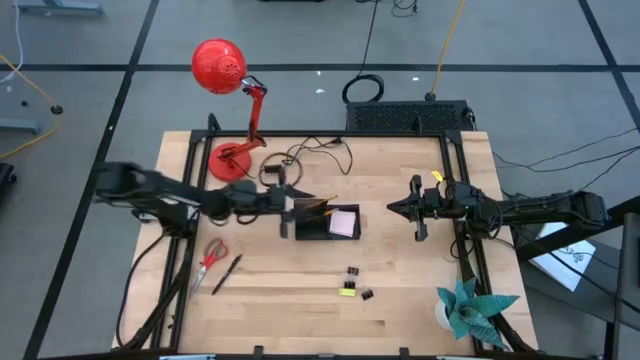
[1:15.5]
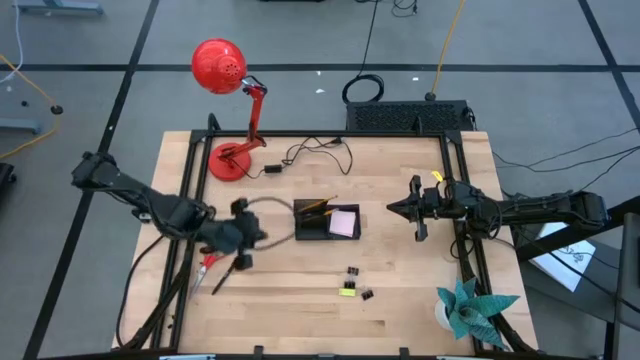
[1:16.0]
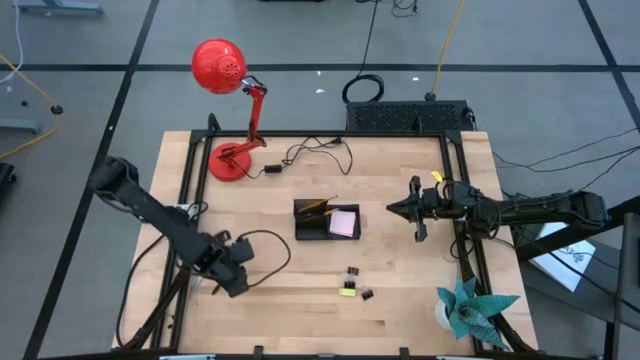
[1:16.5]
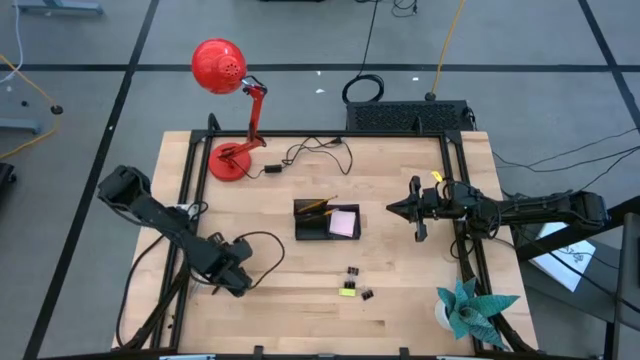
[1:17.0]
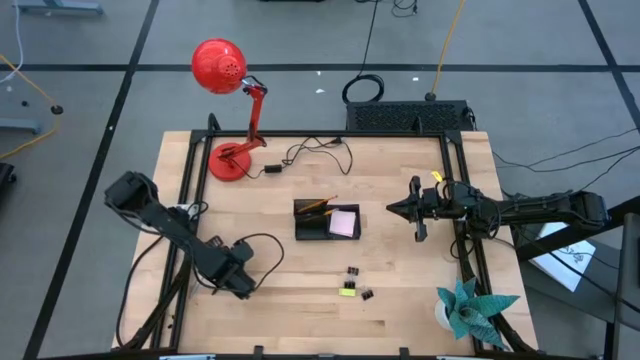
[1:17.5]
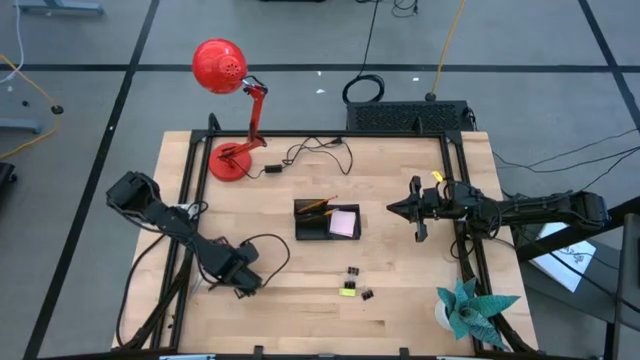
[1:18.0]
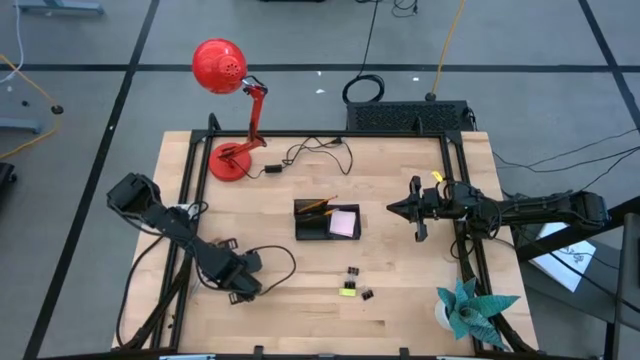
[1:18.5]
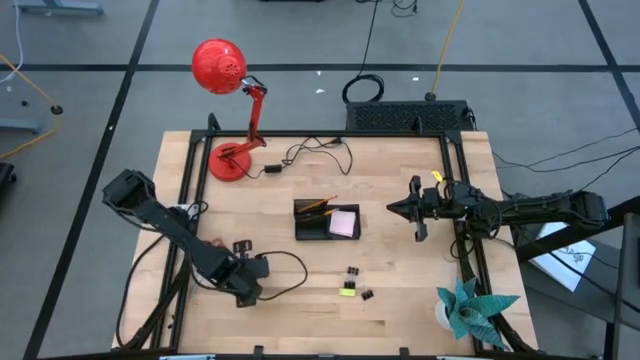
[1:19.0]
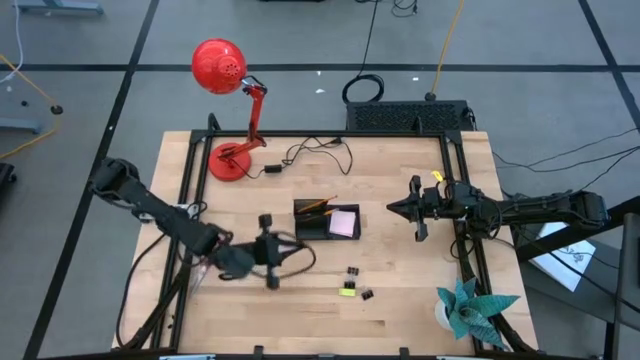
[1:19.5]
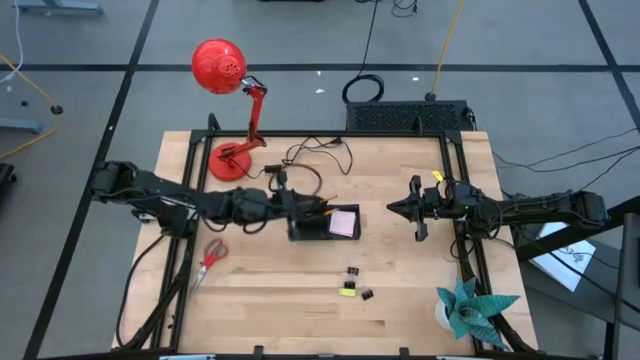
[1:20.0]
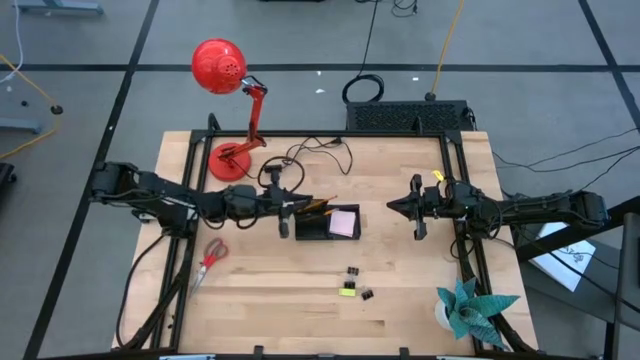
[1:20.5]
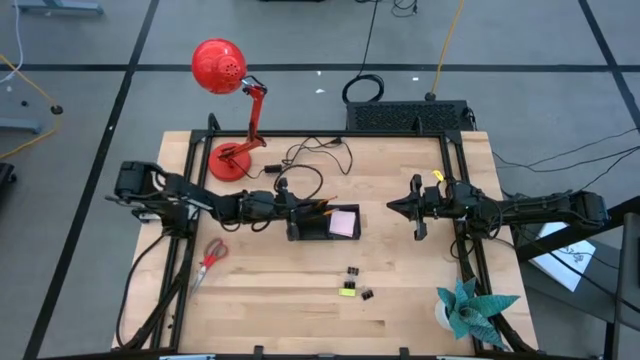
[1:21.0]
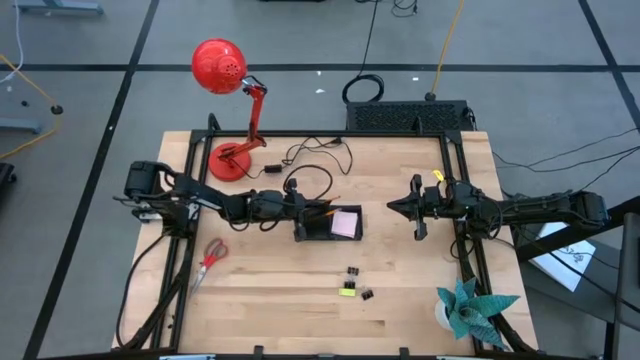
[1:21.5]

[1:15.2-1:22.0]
Task: Pick and place office supplies into organizer
Put the pen into the desk organizer

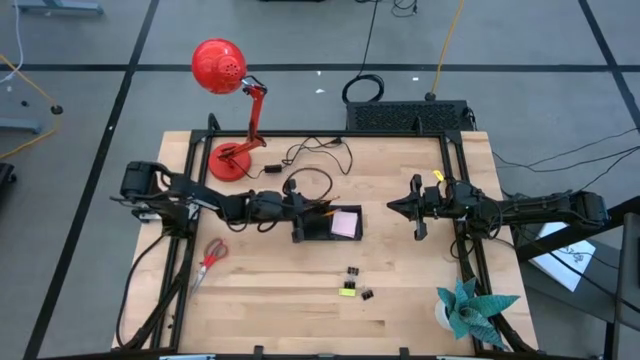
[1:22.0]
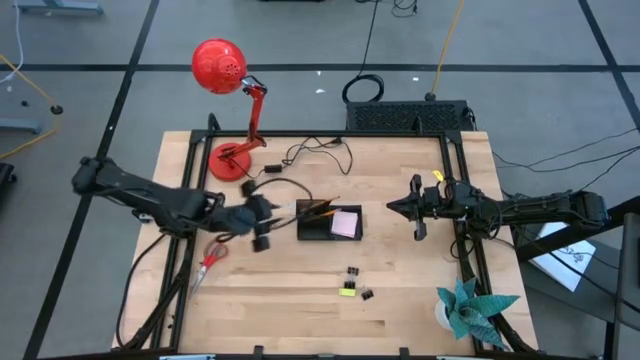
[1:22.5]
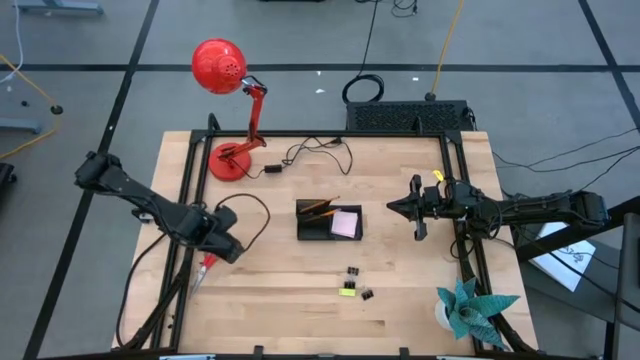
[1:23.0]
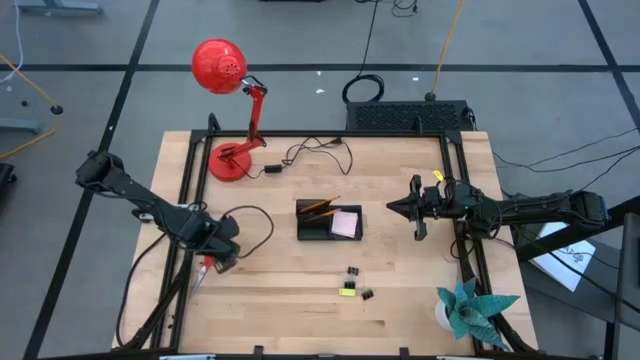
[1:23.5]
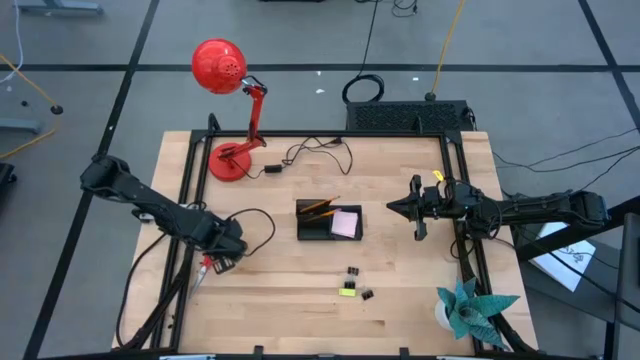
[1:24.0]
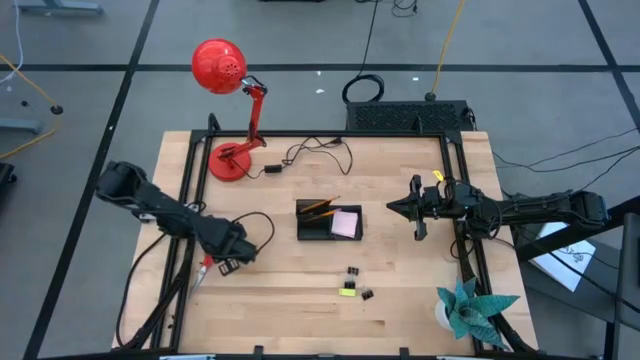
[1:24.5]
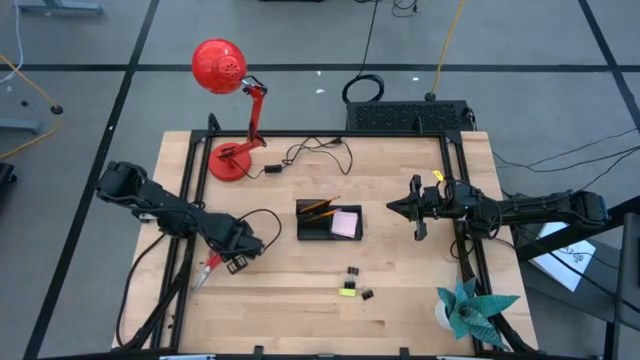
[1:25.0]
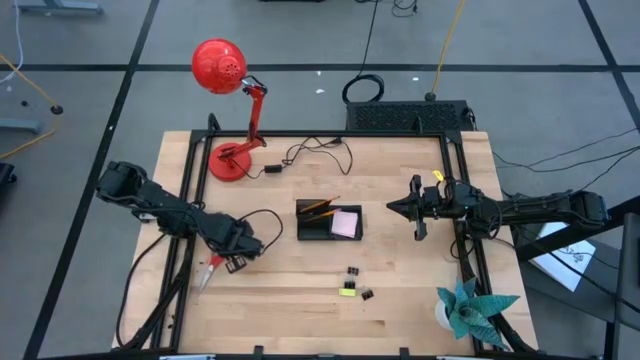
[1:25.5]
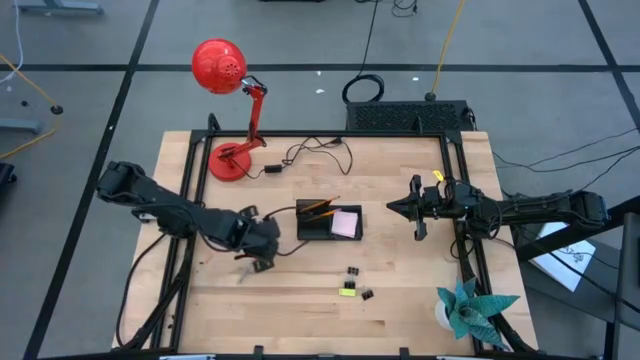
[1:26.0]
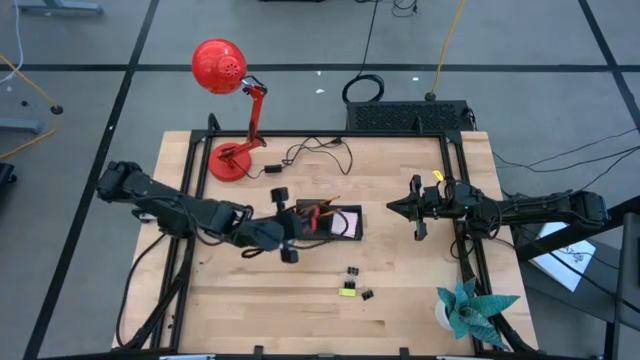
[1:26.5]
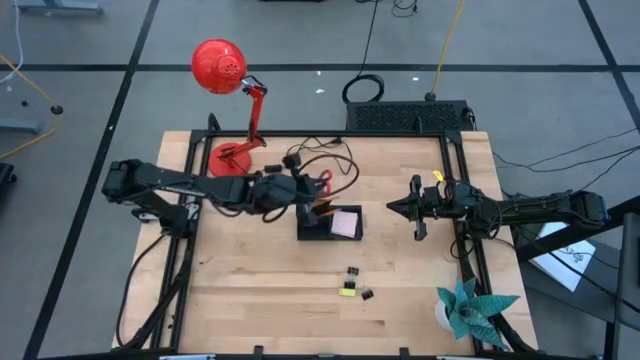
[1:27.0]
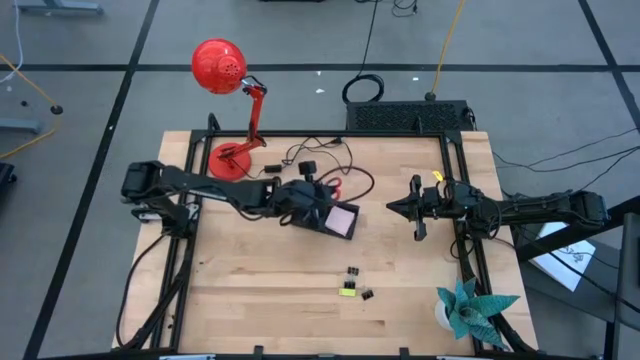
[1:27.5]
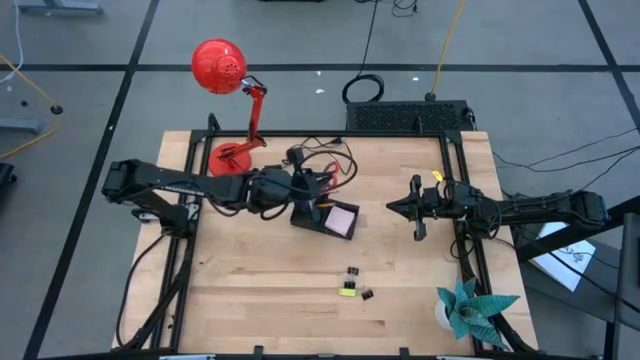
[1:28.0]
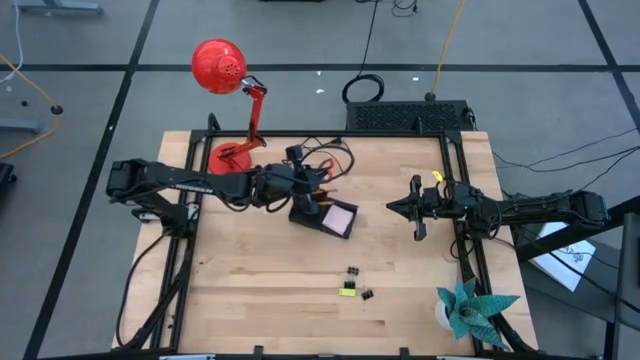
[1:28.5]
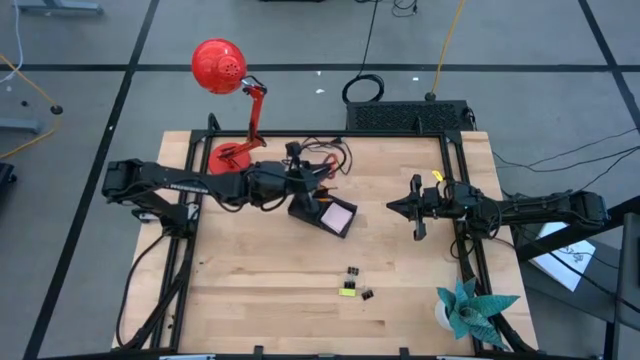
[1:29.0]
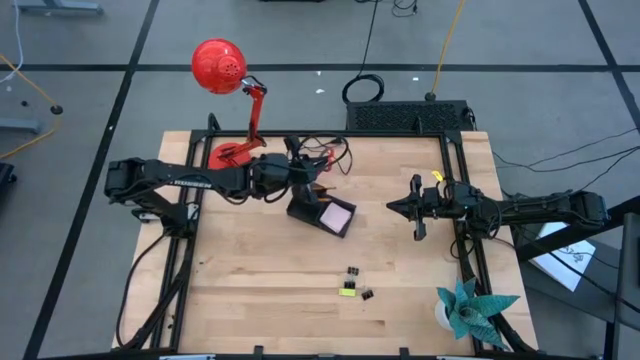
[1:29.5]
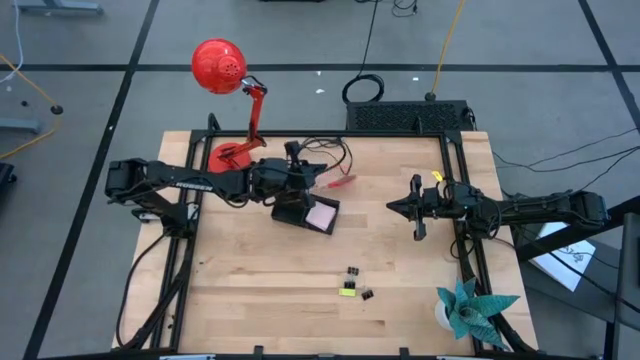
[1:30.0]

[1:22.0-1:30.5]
Put the orange scissors into the desk organizer

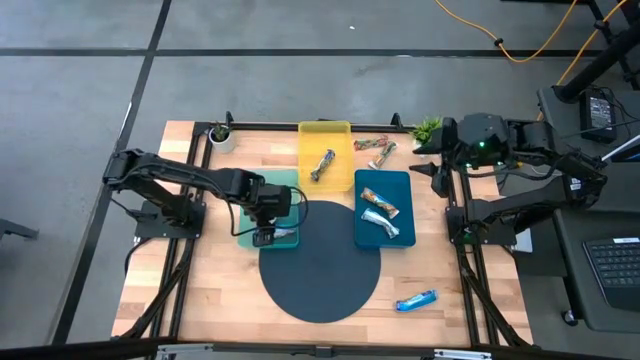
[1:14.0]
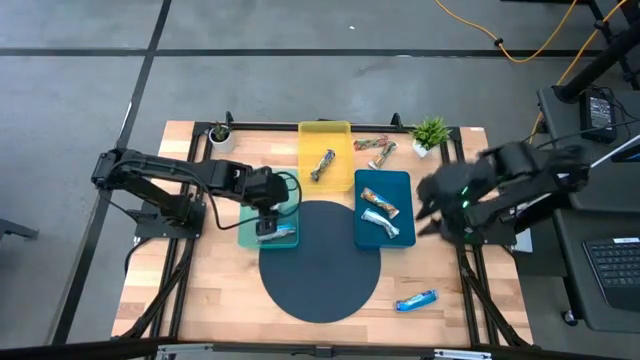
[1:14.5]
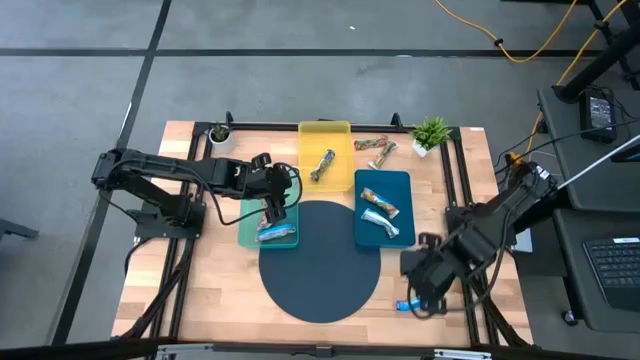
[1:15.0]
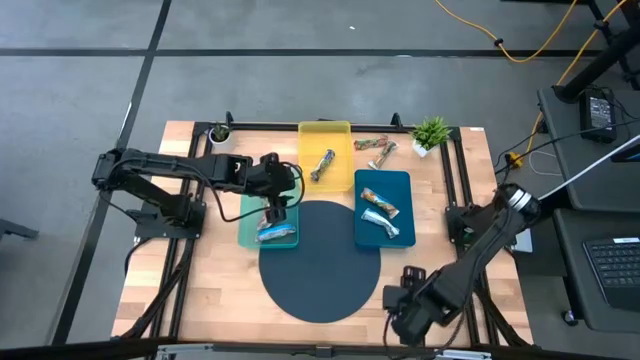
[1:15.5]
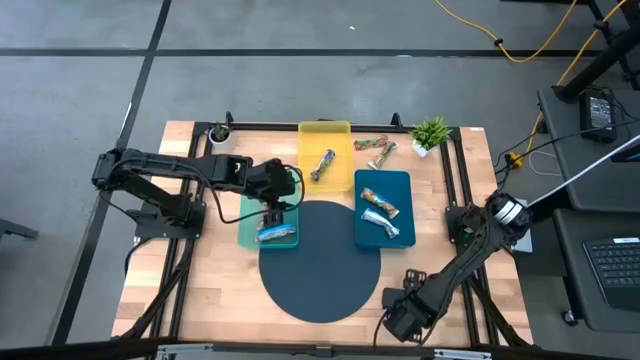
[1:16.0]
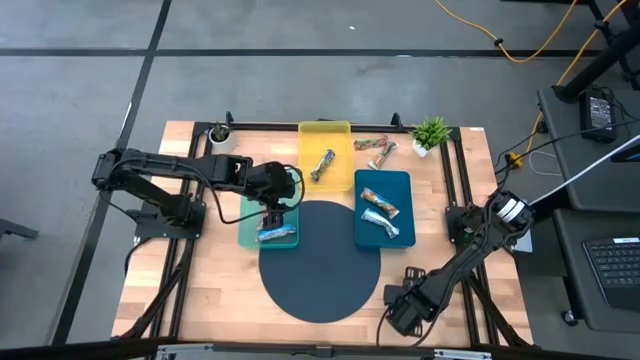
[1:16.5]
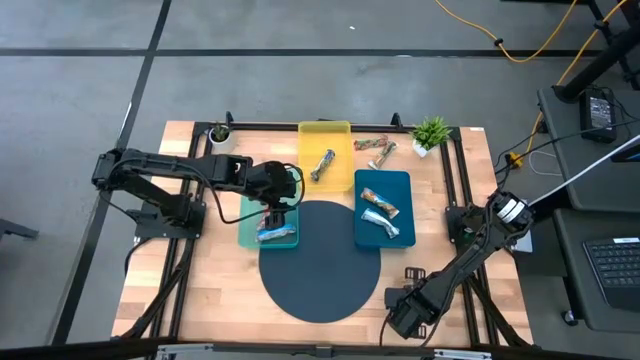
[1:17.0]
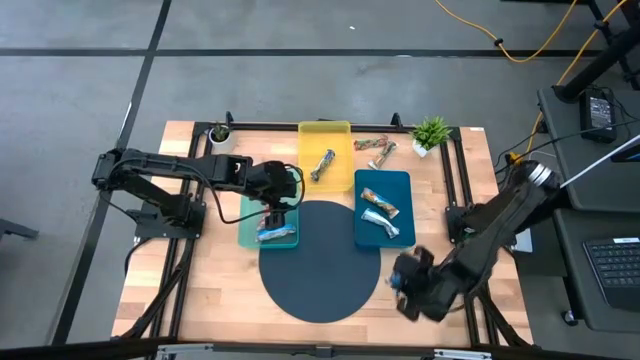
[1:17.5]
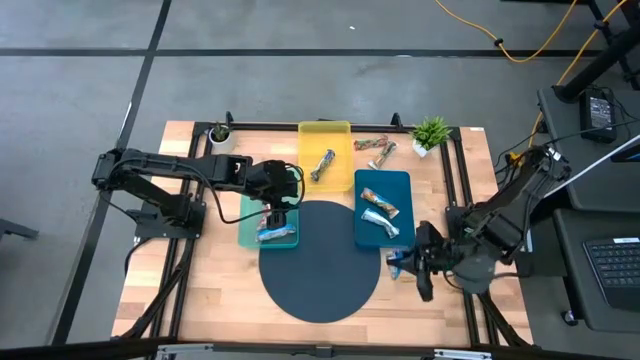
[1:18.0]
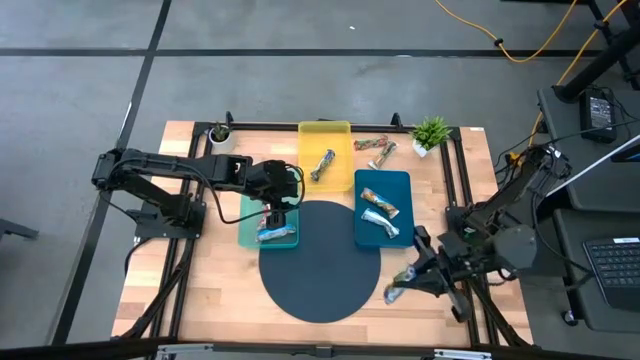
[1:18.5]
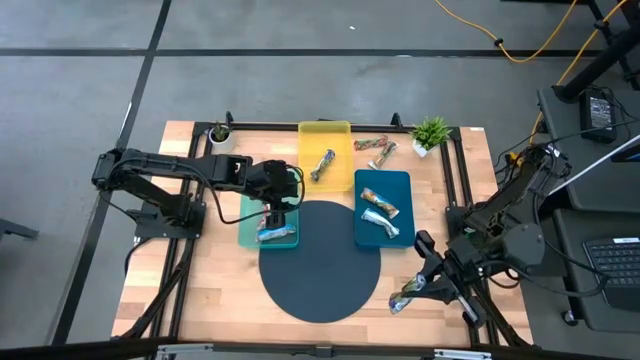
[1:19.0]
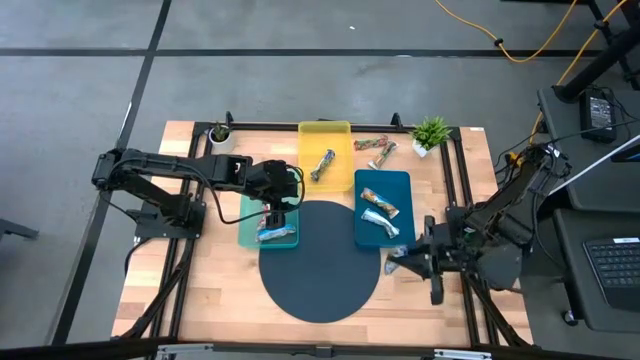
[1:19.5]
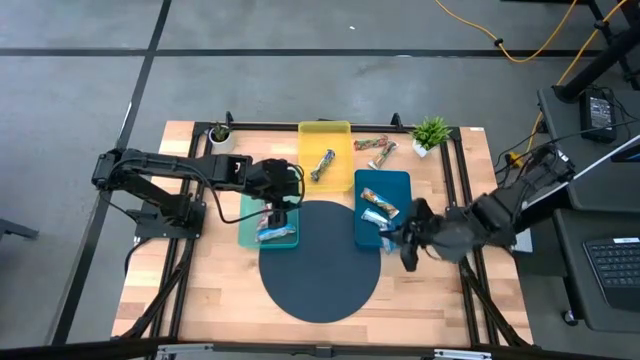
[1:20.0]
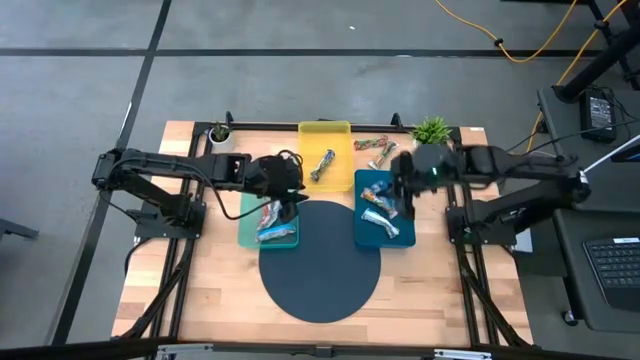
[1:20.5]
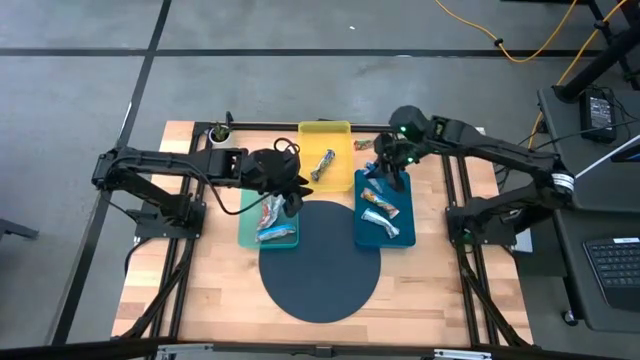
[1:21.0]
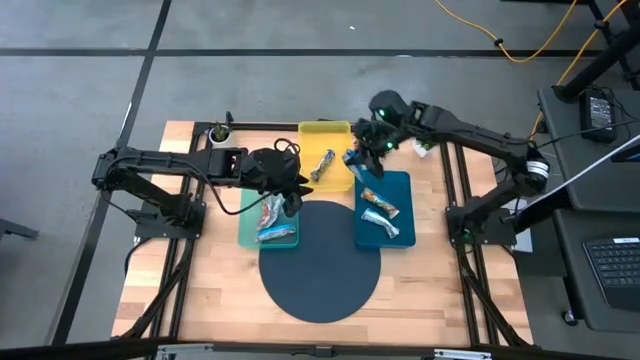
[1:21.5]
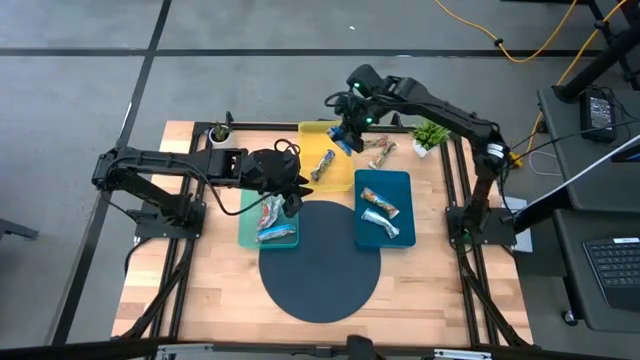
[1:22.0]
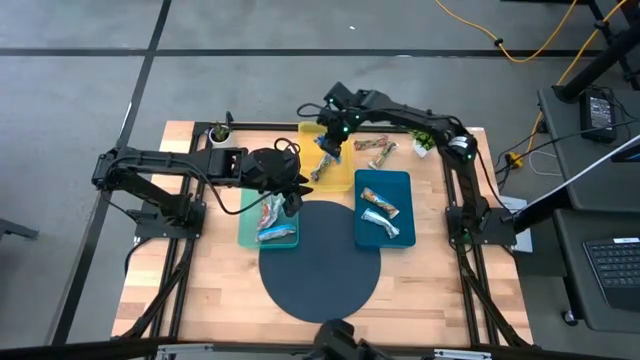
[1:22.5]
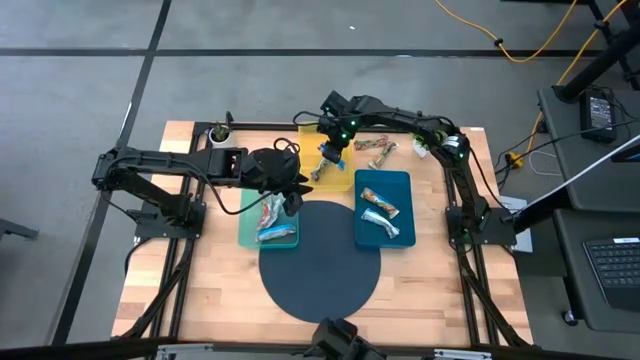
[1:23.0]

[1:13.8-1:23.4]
Task: Pick and place Granola Bars by type
Put the blue granola bar into the yellow bin
